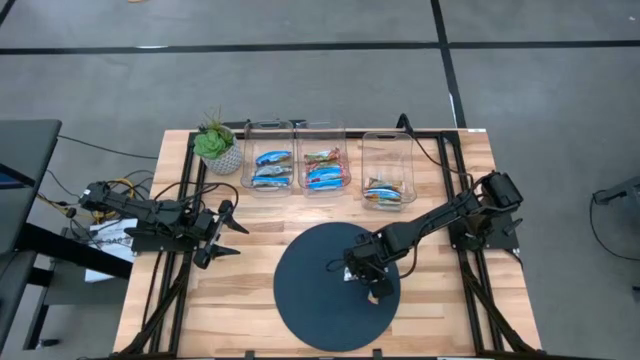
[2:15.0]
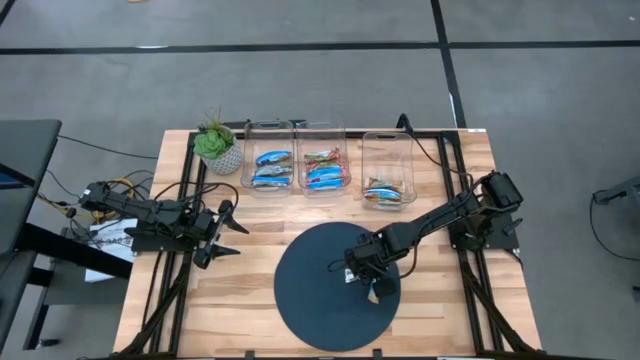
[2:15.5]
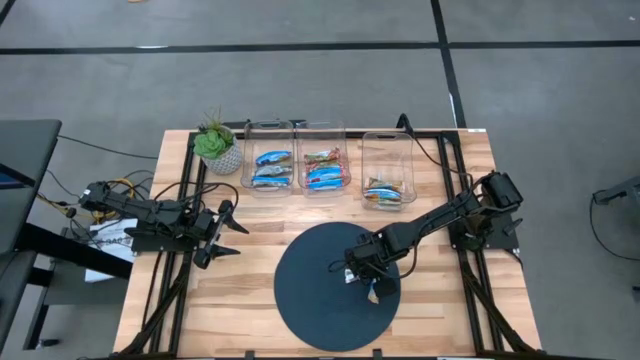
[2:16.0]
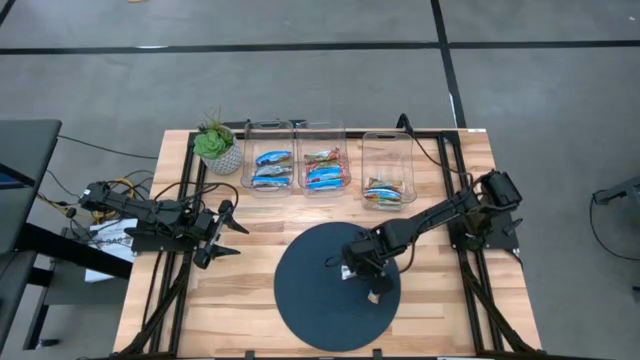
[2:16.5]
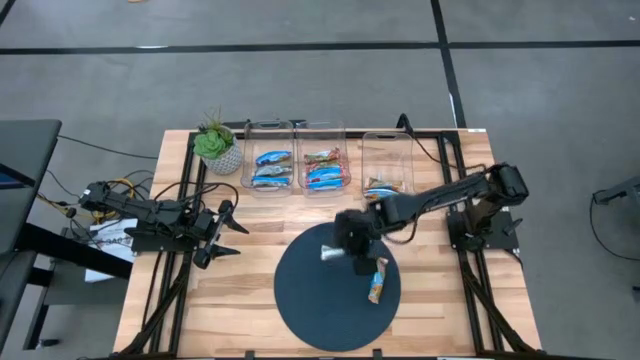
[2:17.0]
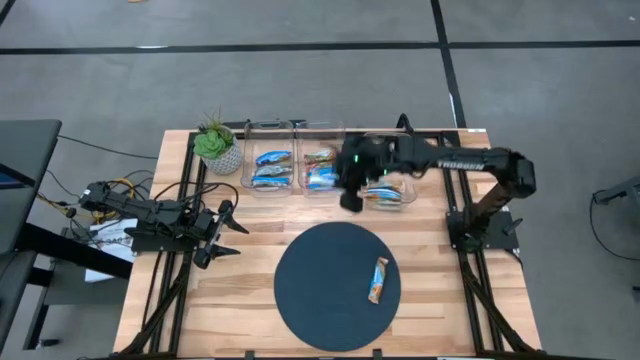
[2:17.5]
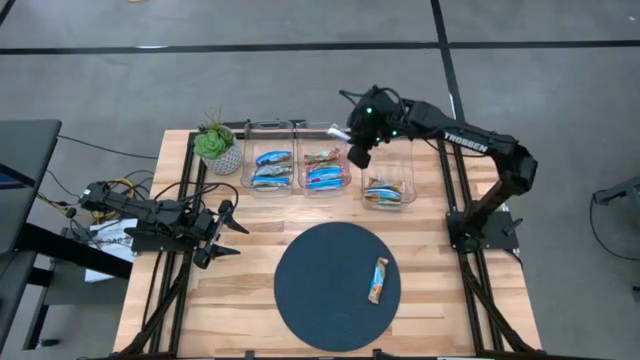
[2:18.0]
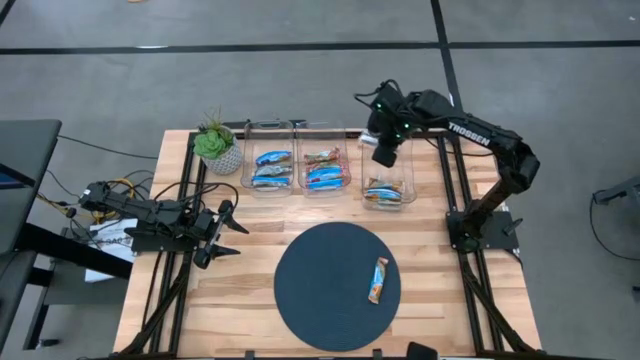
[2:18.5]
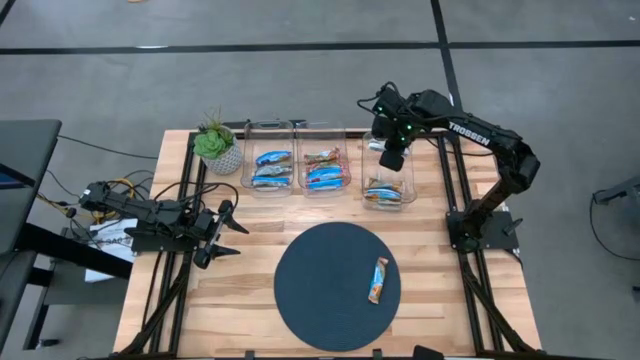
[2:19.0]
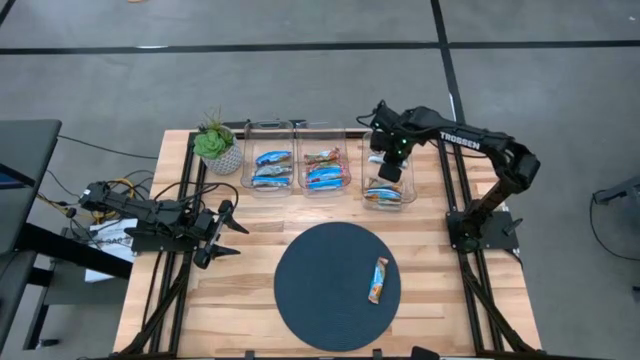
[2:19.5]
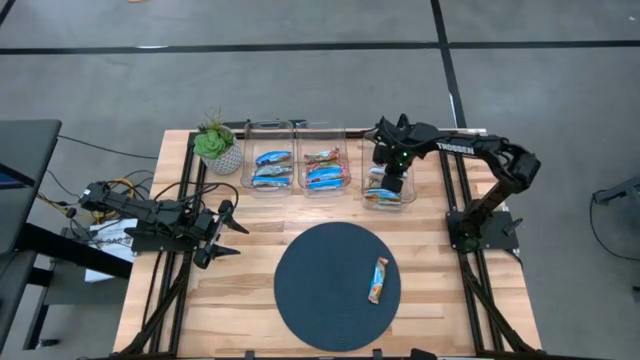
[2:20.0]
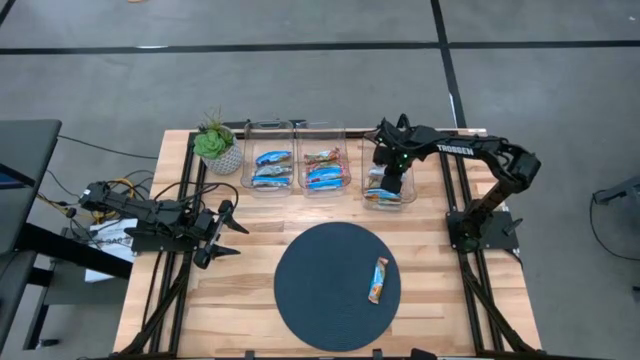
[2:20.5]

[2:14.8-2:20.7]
Task: Pick and place Granola Bars by type
Put the yellow granola bar into the right transparent bin

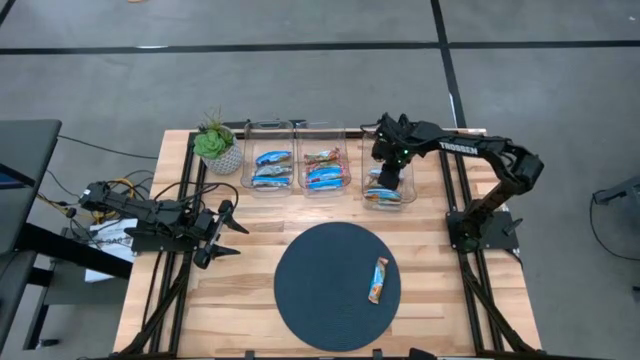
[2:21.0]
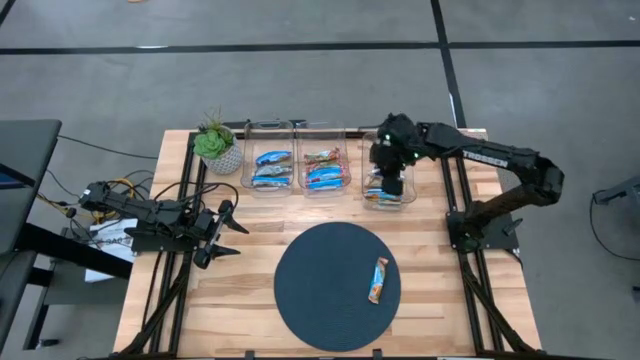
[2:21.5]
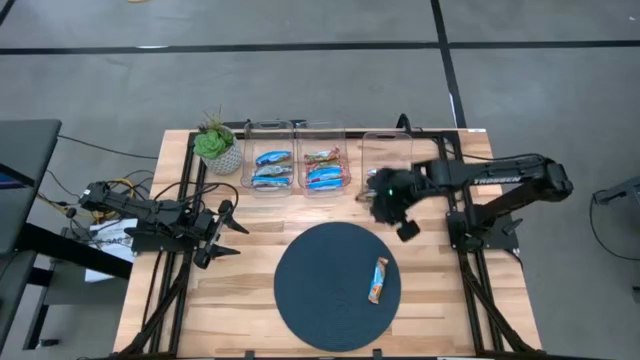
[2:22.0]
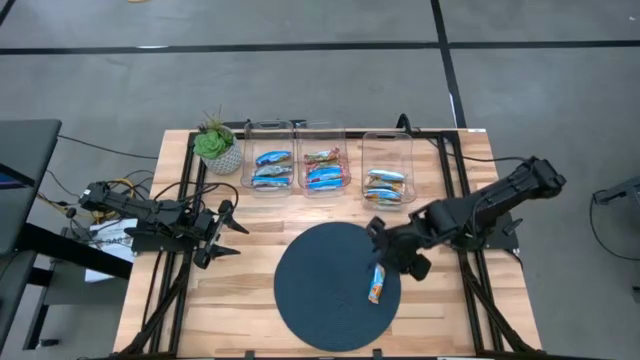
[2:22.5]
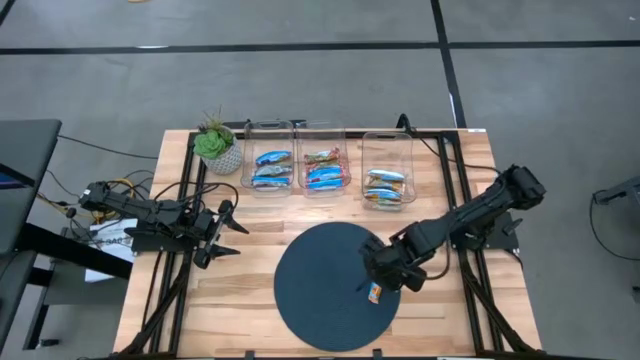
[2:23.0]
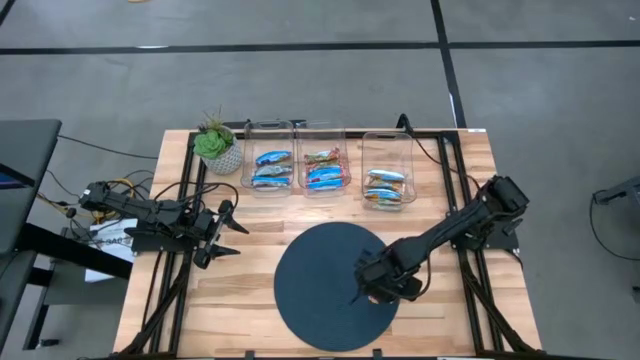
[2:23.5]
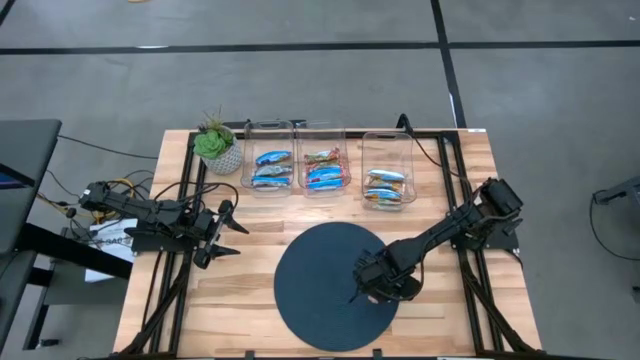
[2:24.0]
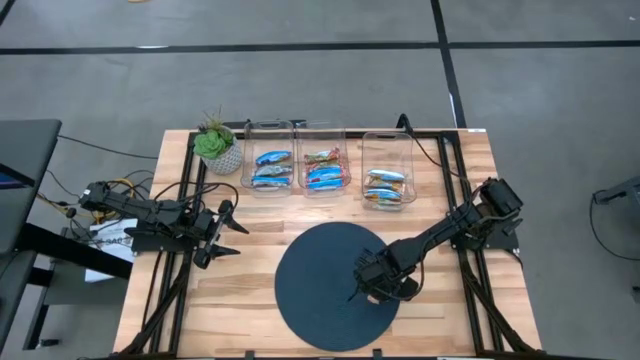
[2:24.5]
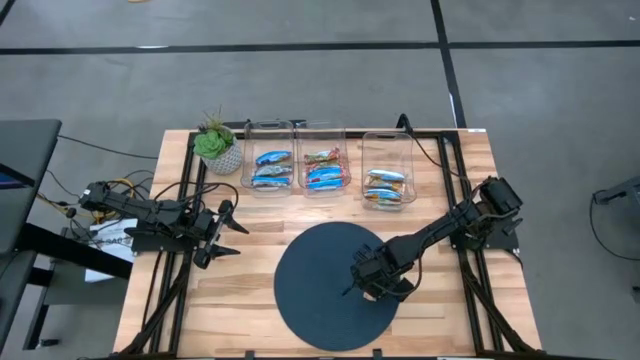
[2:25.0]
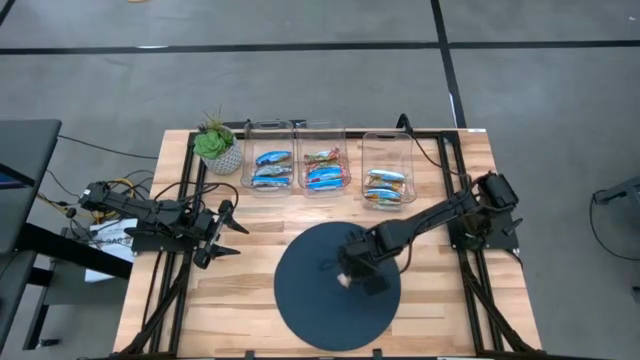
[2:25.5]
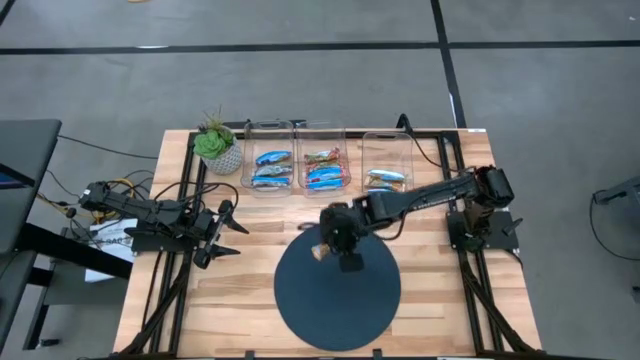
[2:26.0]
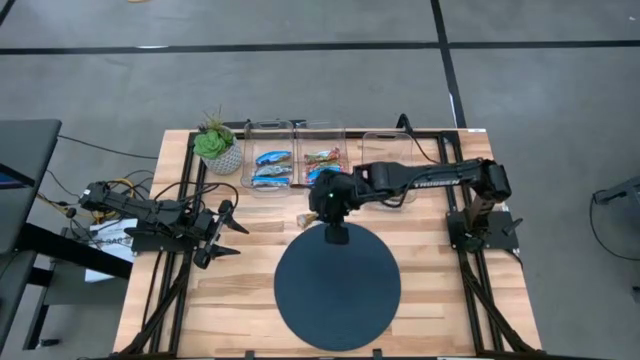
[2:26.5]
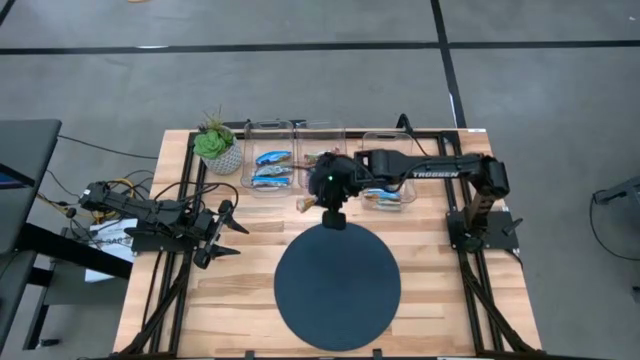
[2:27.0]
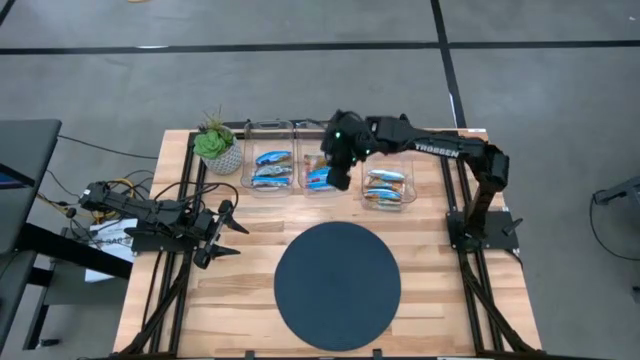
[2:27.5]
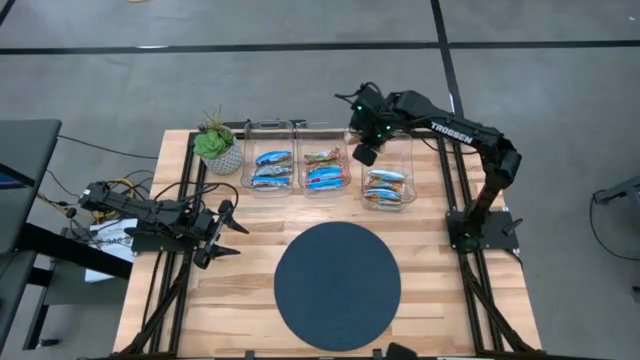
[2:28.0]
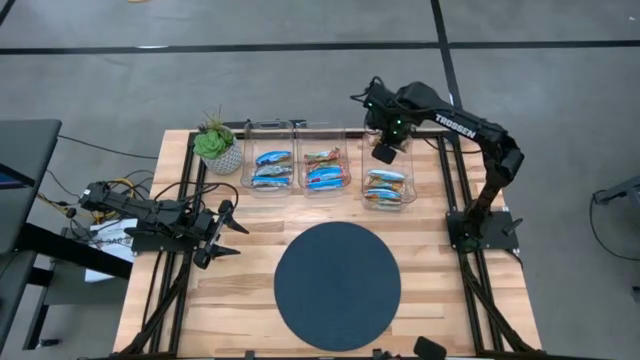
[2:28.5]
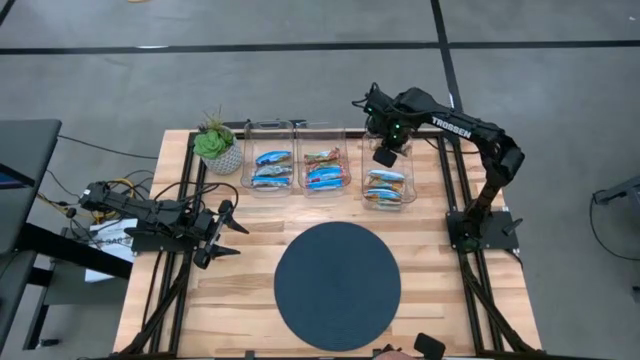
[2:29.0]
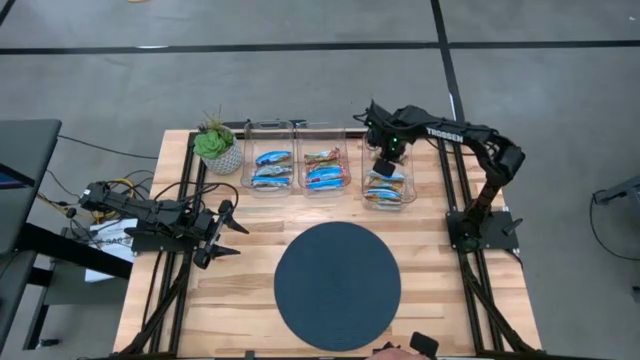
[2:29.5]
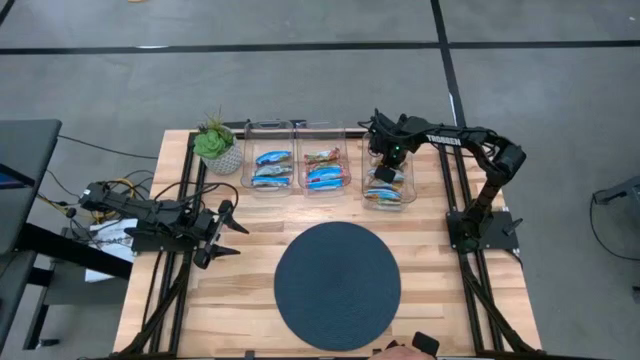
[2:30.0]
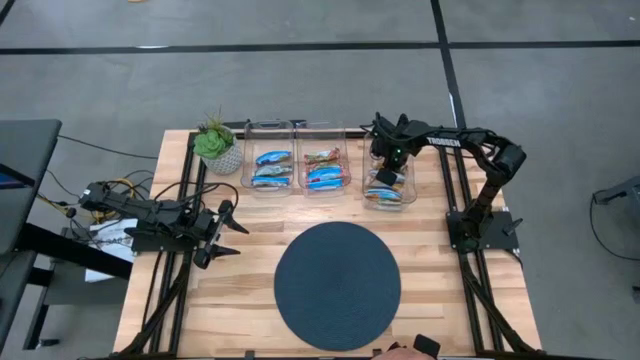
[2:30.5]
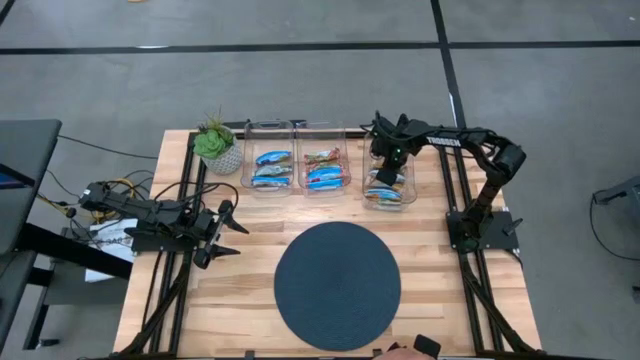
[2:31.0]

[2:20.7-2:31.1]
Put the yellow granola bar into the right transparent bin

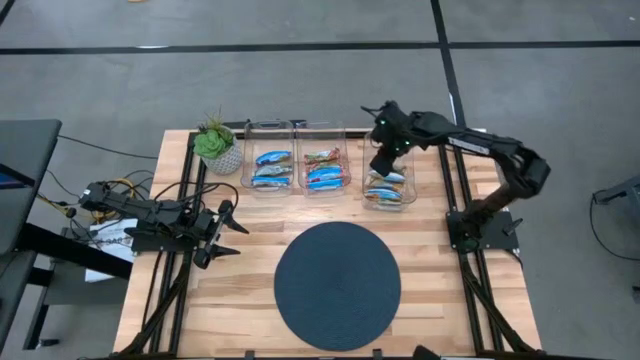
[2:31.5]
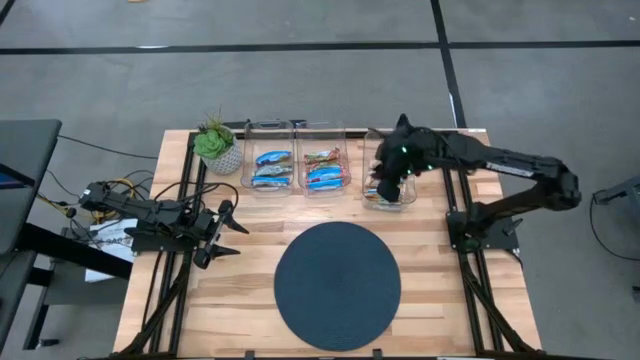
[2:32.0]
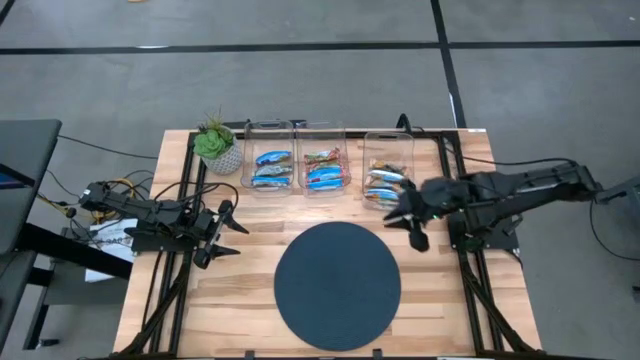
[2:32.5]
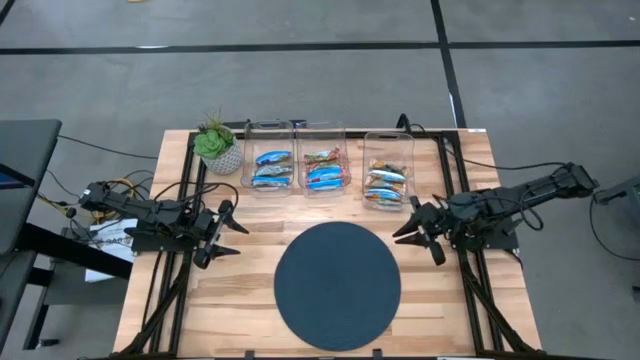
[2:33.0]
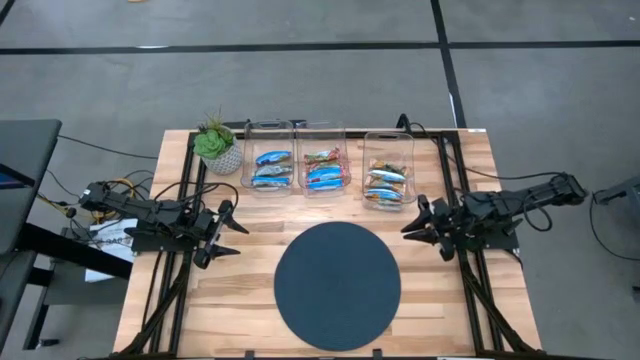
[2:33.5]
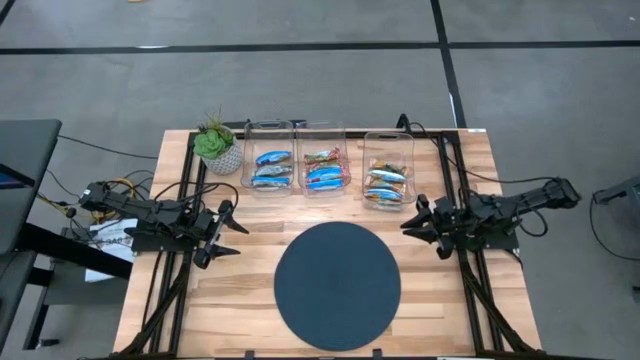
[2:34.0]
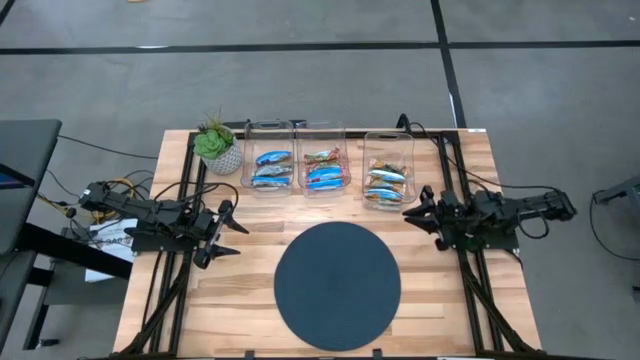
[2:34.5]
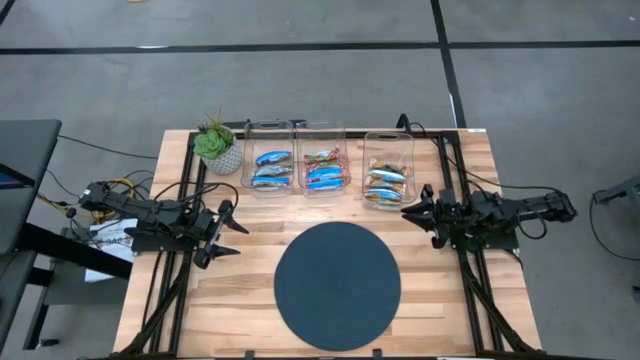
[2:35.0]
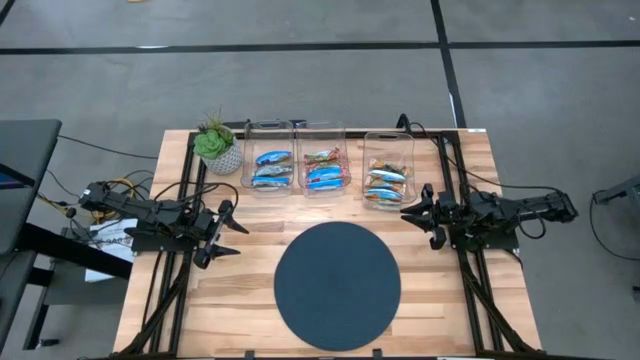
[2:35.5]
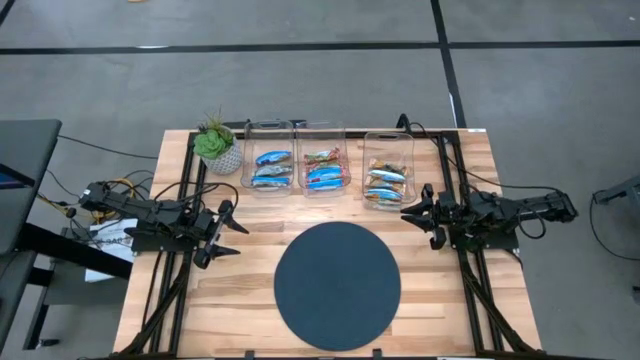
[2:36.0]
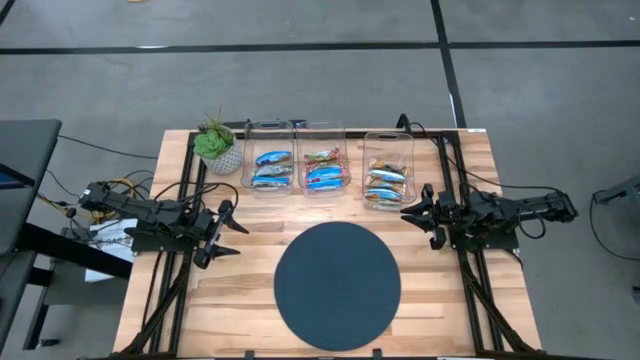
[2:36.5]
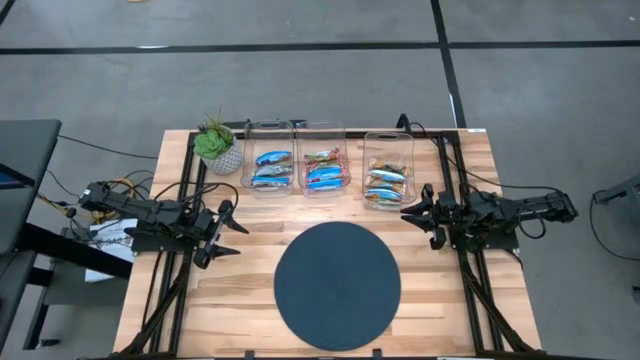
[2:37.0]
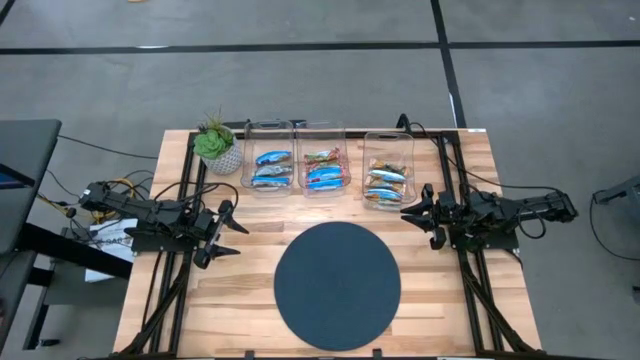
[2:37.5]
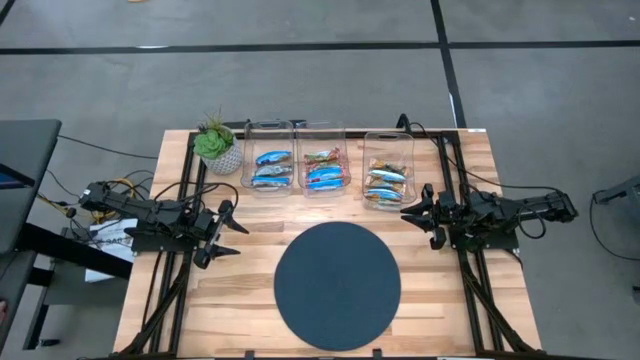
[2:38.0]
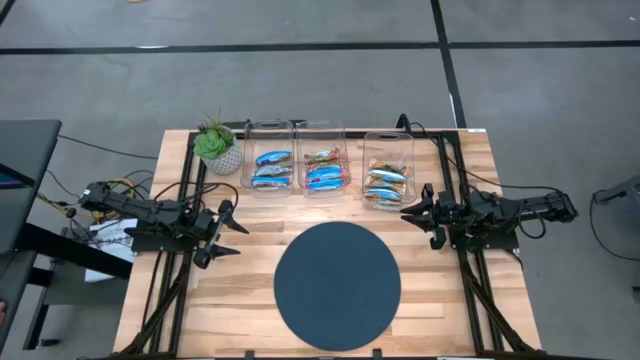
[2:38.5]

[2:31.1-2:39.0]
Return to Home Position
